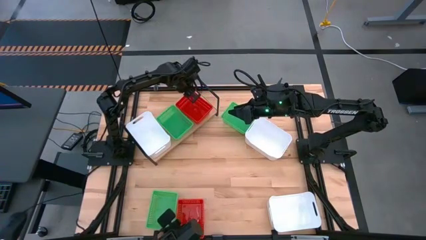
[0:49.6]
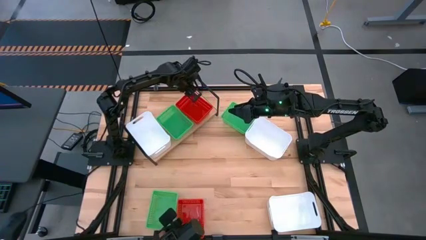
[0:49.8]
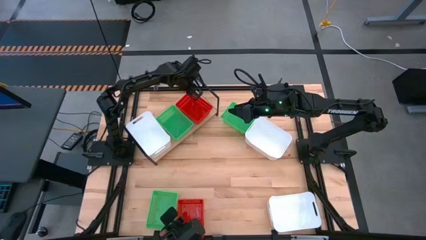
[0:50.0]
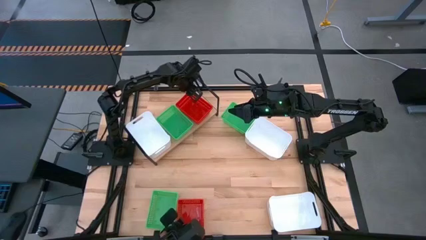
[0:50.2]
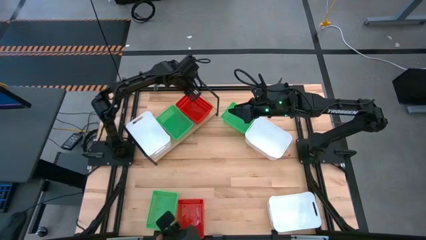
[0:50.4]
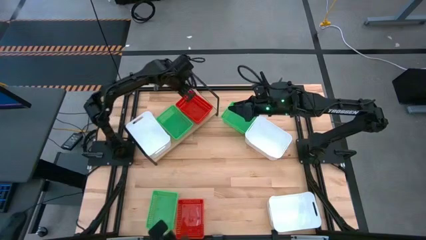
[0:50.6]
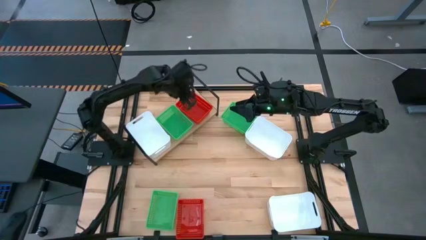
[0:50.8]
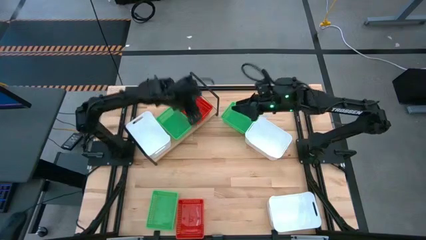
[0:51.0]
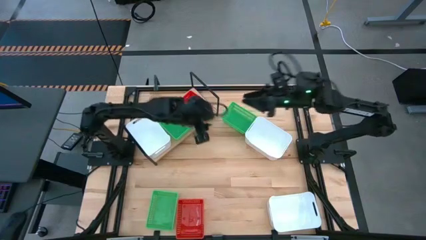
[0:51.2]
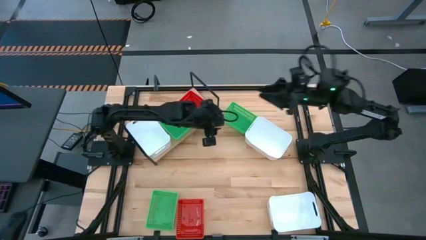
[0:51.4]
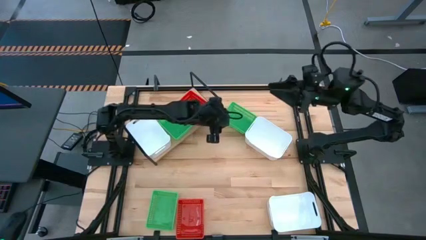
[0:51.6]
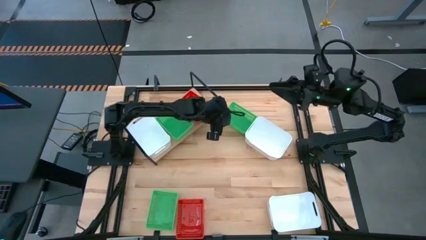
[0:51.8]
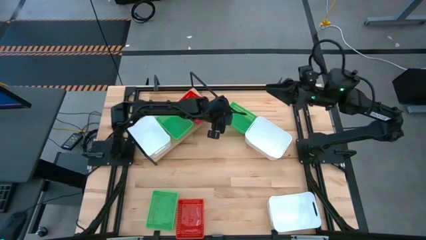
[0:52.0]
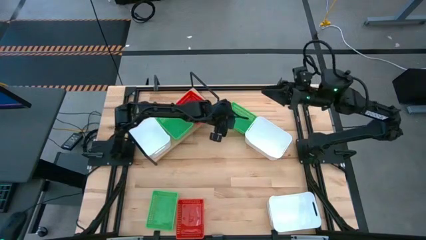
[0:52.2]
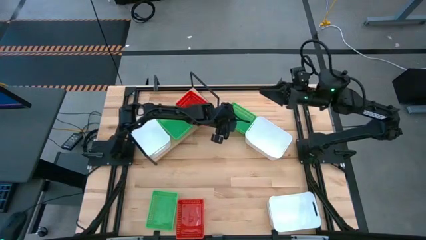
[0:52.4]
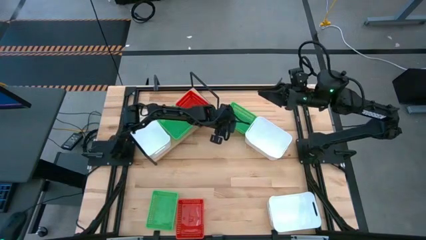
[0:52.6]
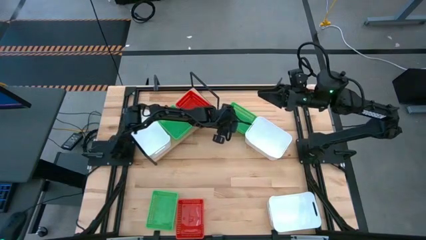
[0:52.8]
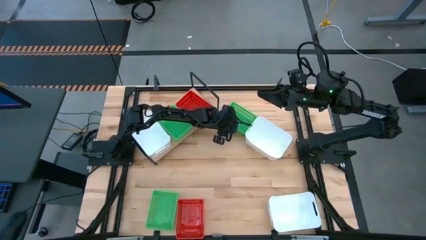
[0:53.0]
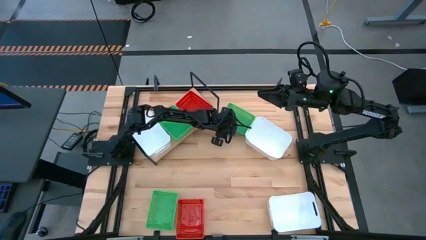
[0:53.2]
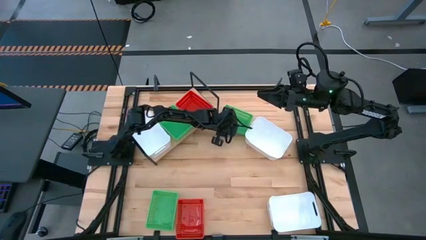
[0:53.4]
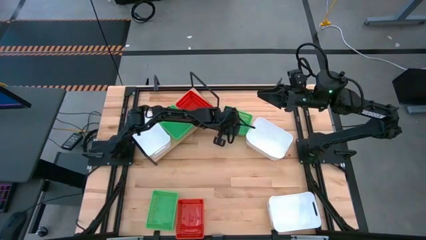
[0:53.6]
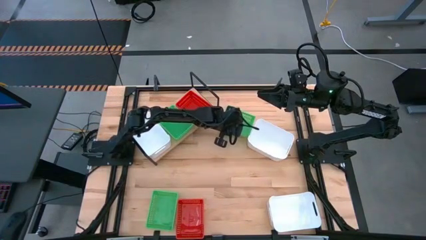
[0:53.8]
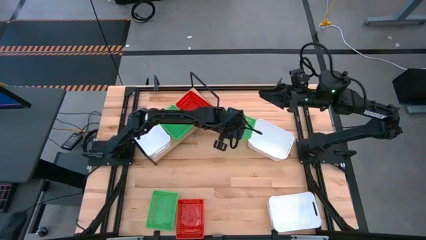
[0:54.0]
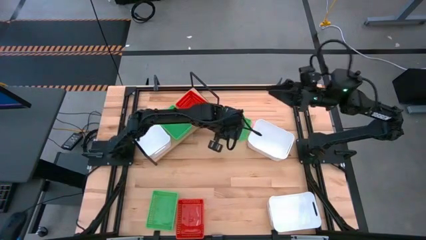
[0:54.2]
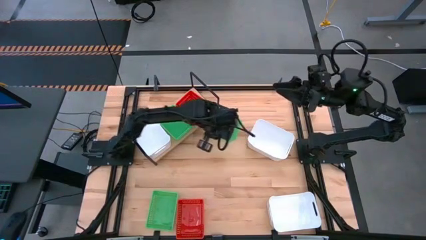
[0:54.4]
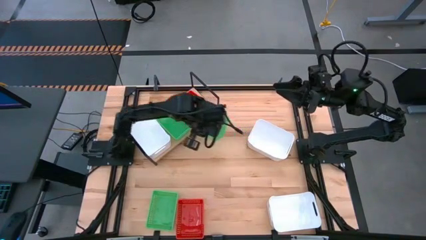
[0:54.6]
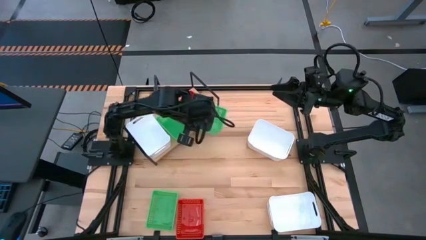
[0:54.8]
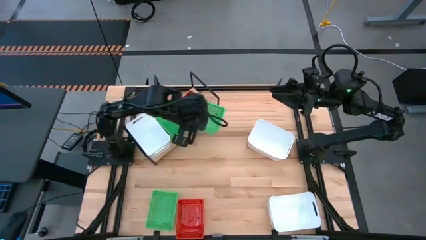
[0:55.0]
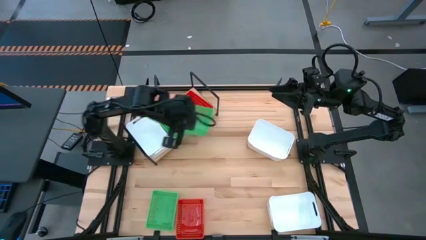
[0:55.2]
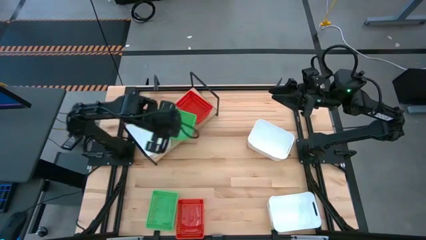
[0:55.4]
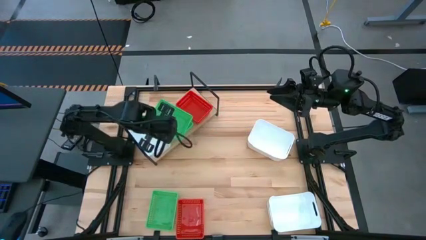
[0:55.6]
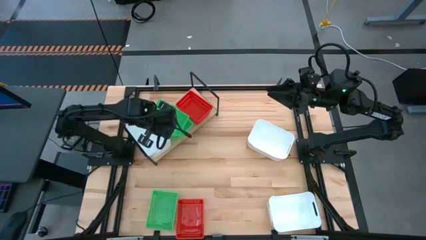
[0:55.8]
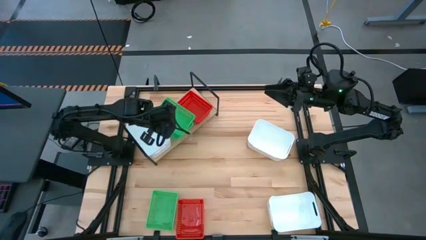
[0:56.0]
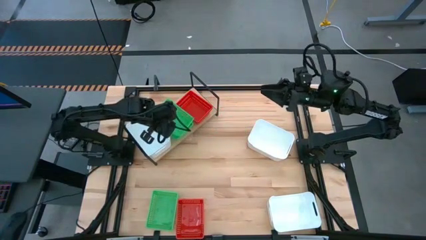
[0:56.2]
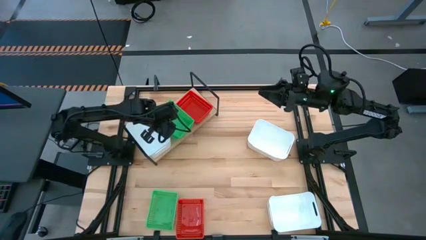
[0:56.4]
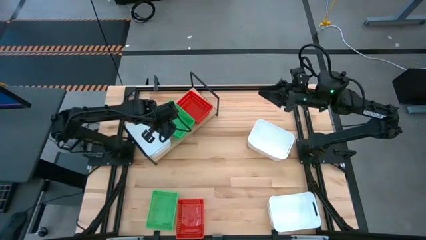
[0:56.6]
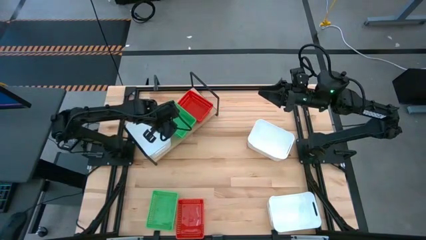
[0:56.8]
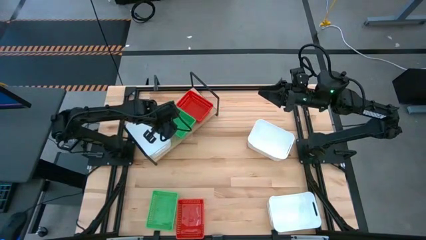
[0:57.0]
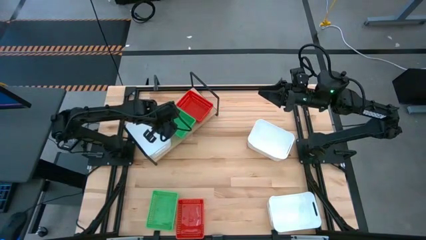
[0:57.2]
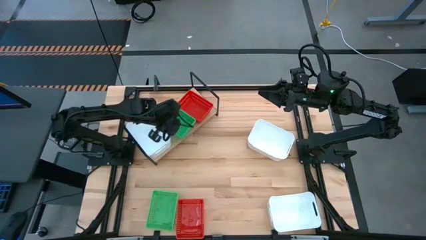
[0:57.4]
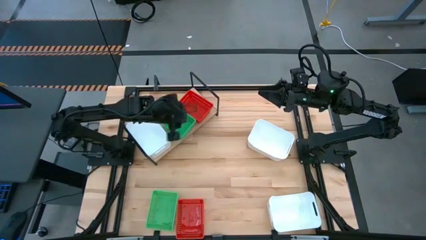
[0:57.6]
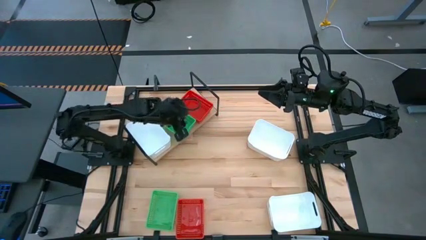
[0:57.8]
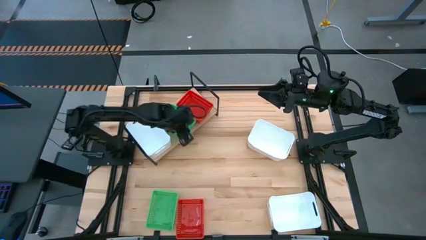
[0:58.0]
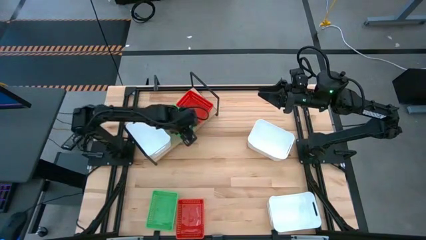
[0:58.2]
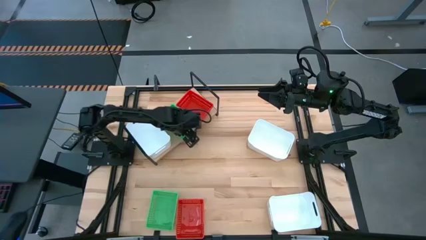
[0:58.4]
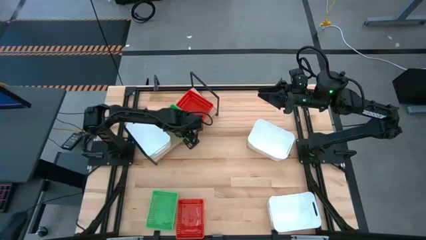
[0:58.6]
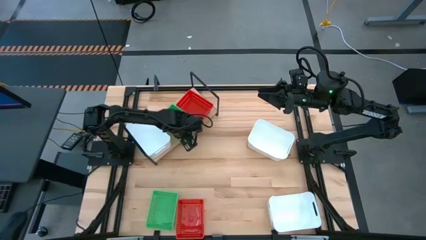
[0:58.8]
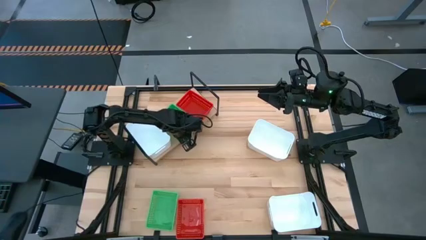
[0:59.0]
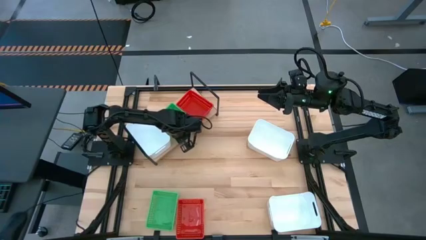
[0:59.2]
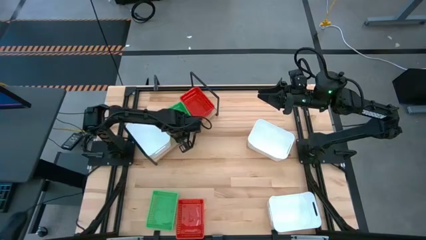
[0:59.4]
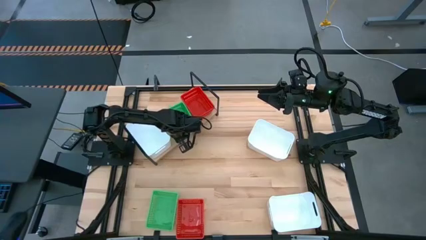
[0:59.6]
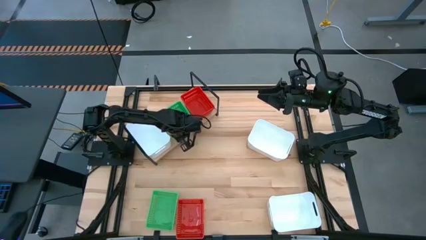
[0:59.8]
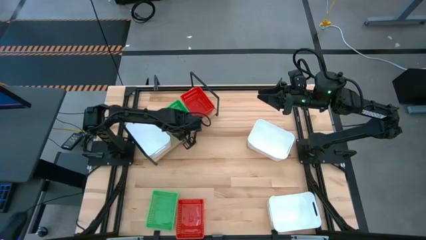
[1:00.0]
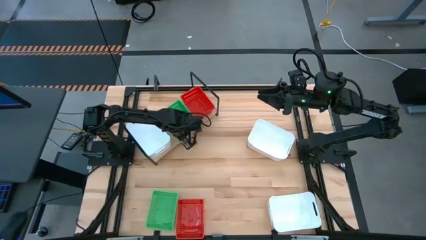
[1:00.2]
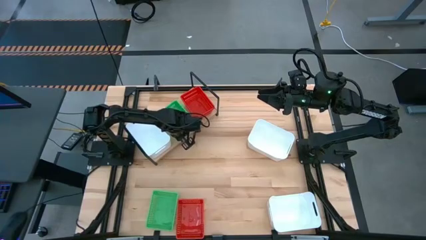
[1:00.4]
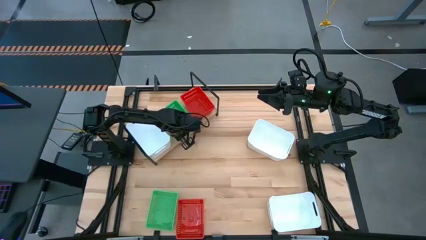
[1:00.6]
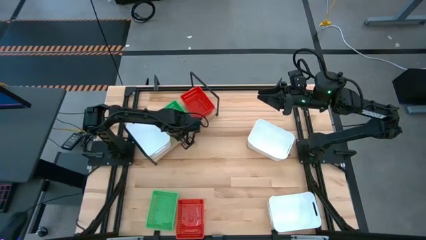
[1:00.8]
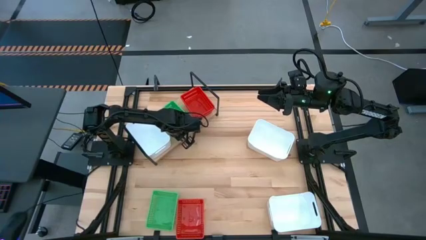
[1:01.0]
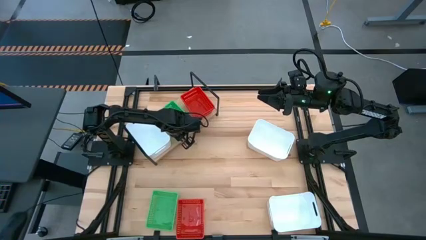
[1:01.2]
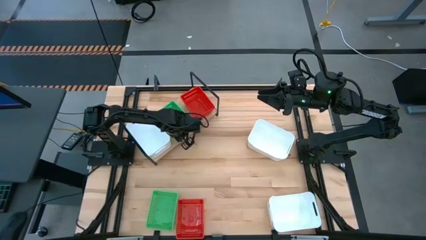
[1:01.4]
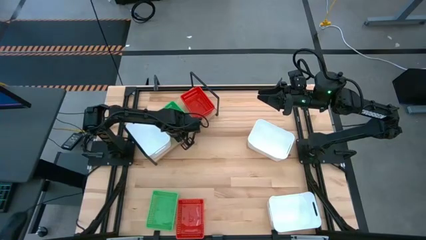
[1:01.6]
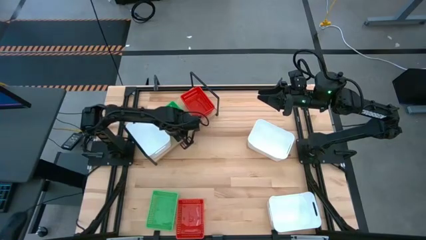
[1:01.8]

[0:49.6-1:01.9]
Task: Stack baskets on shelf by color
Stack the top green bin on top of the green bin on the shelf
